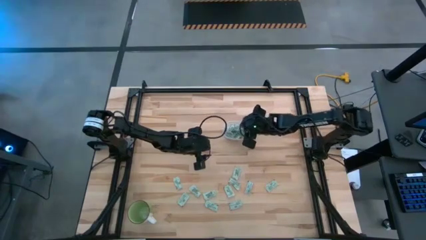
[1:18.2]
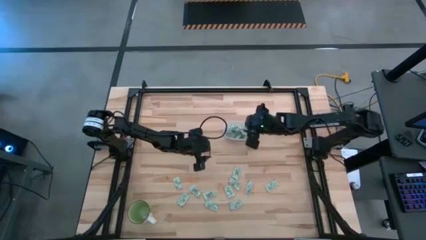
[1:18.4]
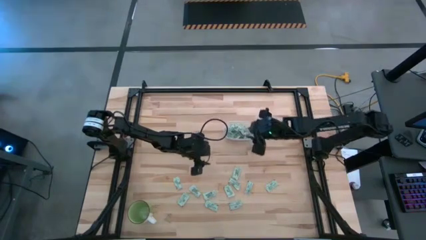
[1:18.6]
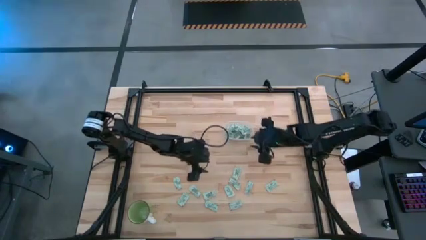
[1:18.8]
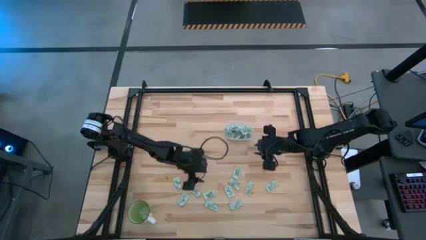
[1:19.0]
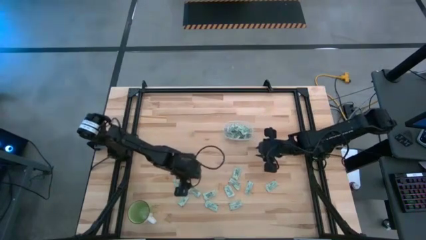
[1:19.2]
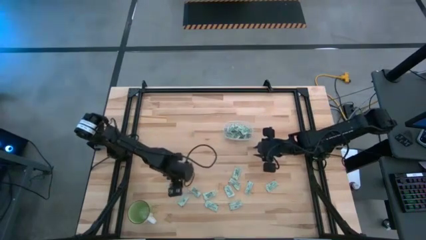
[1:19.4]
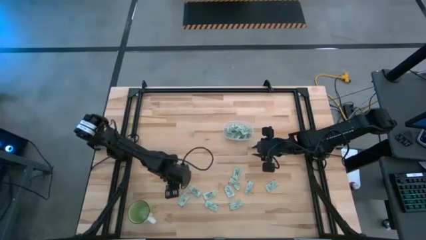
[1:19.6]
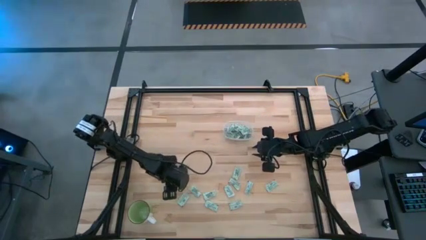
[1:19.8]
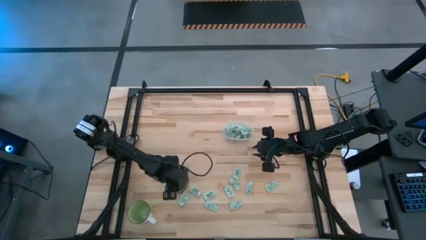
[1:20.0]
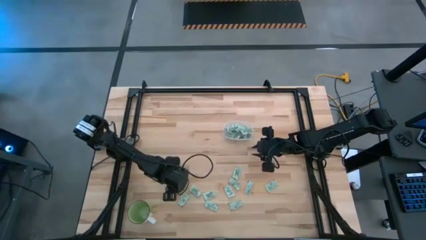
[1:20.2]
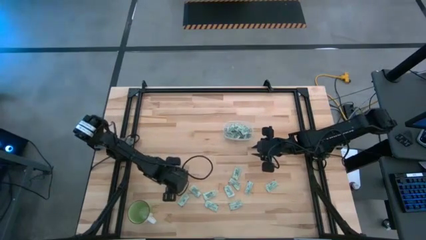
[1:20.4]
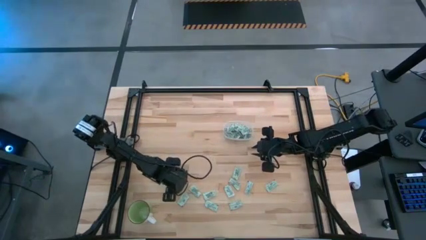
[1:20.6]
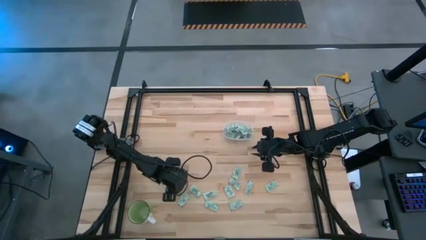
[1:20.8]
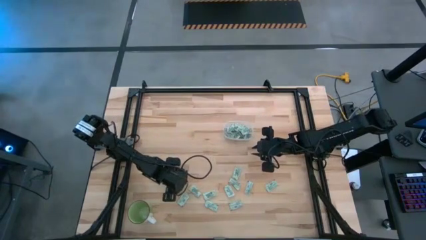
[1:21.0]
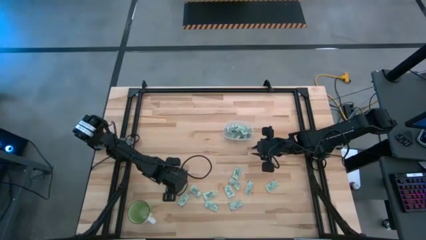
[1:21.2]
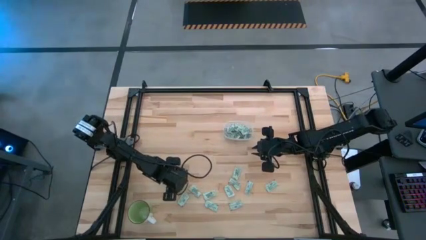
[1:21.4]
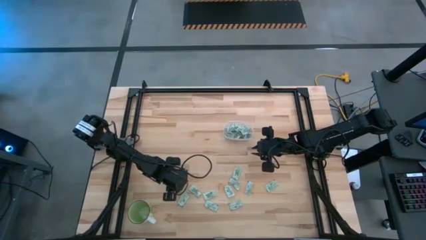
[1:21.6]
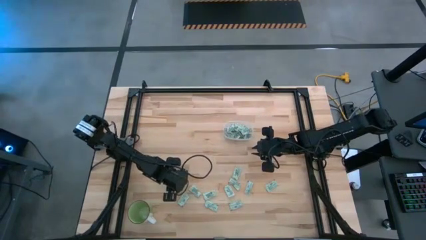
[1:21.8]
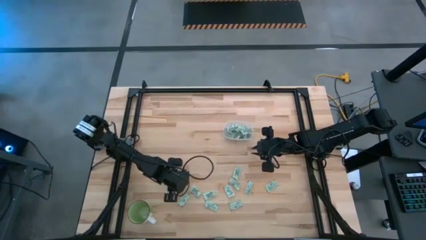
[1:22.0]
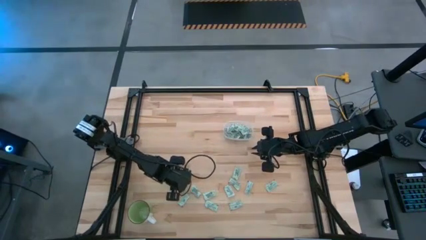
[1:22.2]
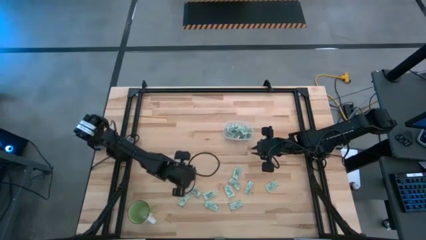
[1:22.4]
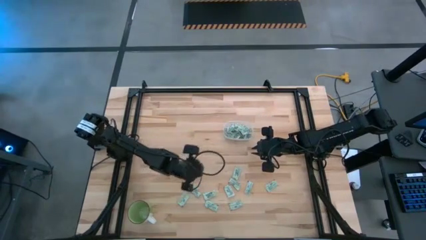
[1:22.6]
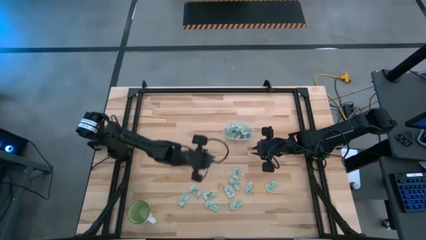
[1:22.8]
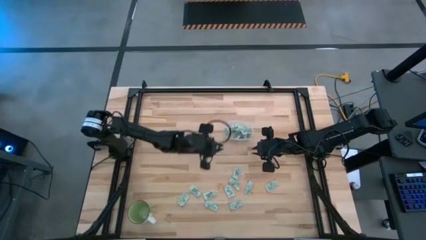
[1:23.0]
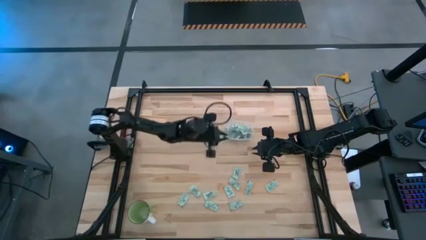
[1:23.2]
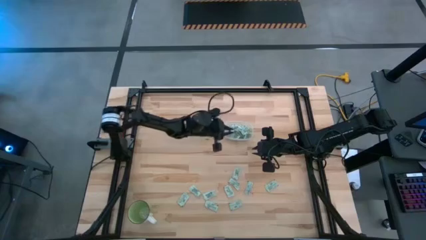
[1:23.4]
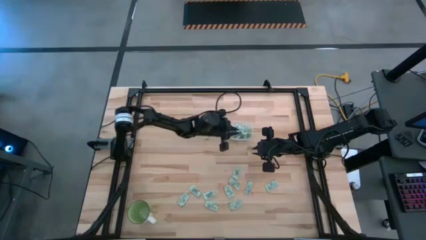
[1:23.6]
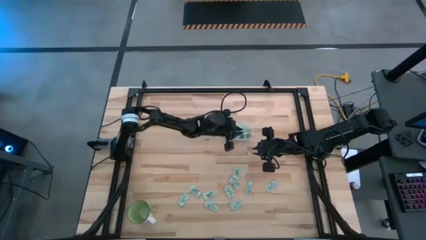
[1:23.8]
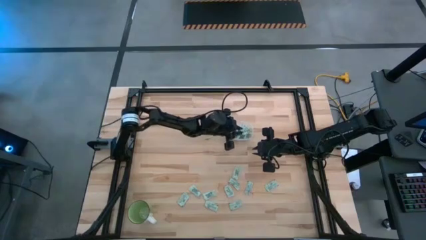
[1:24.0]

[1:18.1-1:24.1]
Task: Pick and place Stevia / Truvia into bins
Put the stevia packet into the transparent bin

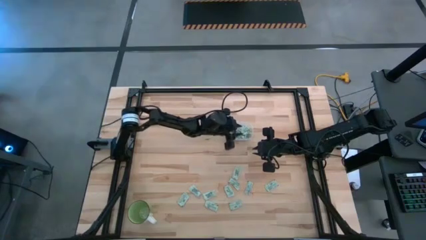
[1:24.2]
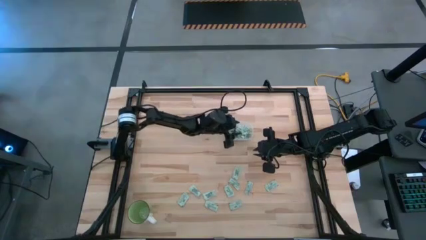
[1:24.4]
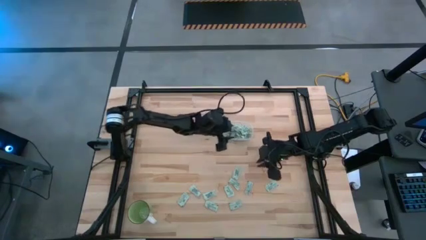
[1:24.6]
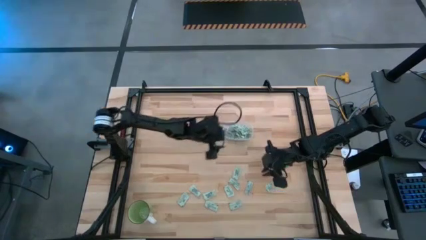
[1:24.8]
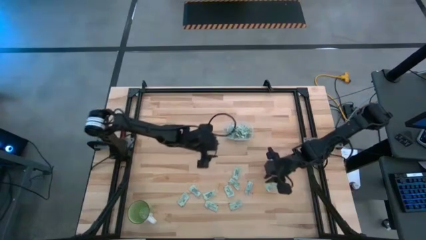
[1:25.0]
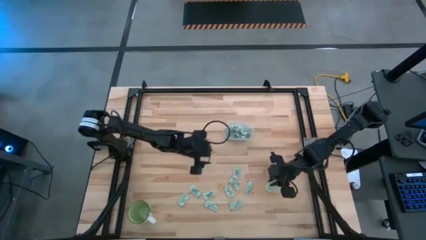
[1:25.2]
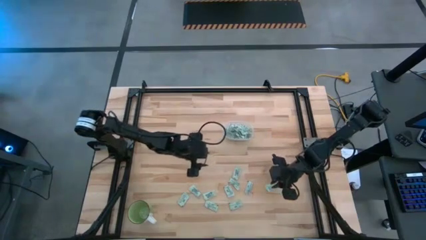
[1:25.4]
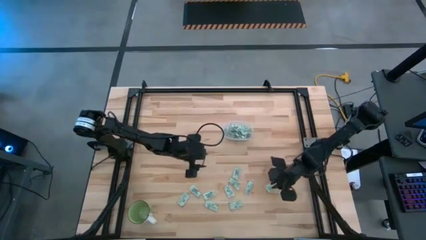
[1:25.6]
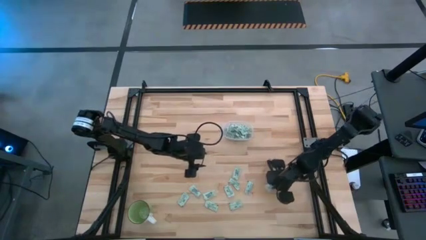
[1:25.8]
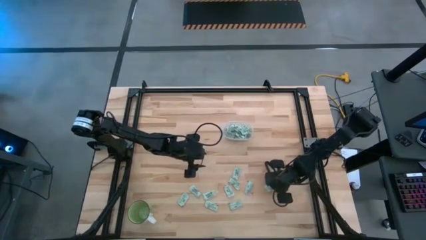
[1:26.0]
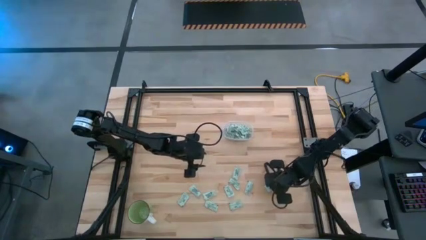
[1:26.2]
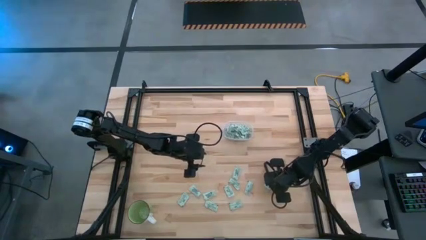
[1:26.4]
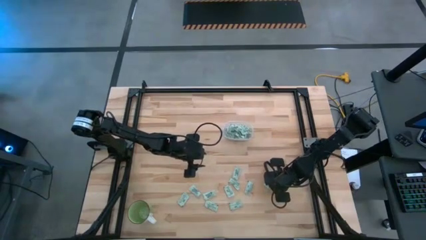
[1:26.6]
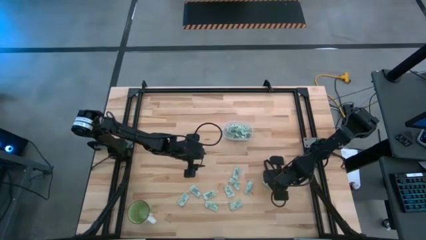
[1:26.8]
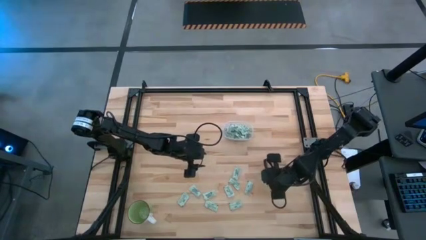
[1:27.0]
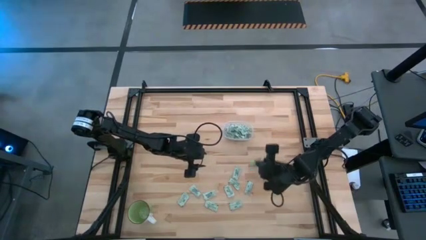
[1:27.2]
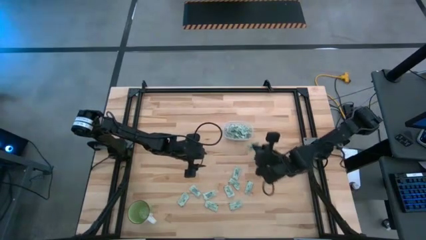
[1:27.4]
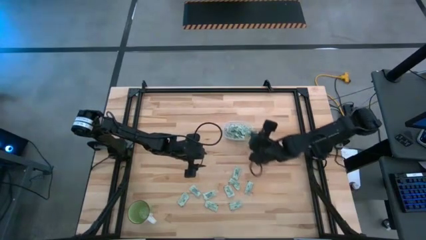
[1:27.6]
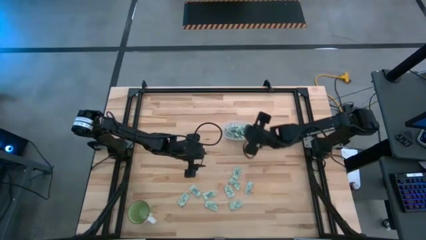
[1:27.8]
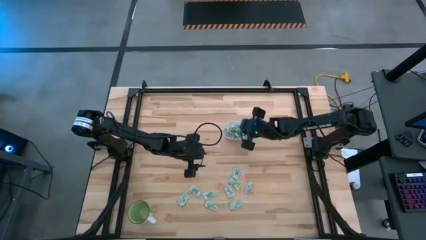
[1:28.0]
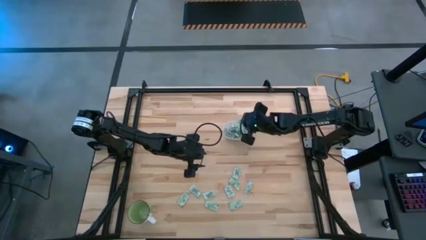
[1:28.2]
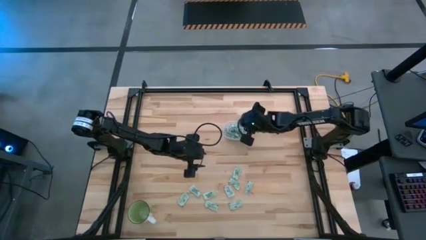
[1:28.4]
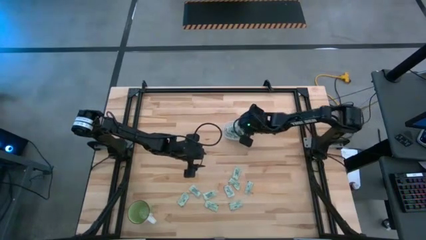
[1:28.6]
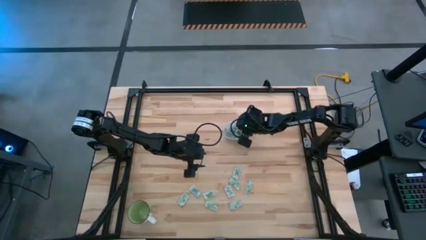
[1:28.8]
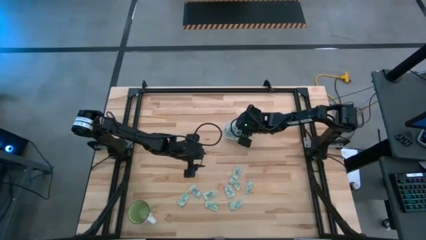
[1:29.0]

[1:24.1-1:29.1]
Put the stevia packet into the transparent bin

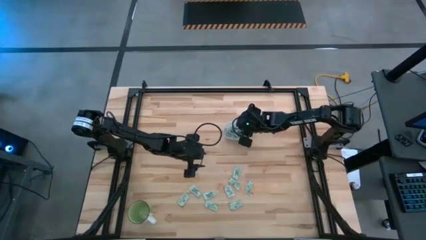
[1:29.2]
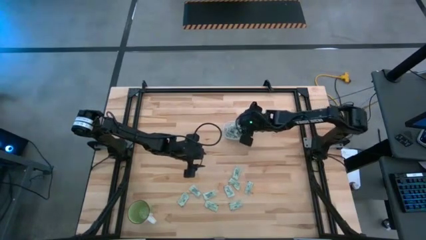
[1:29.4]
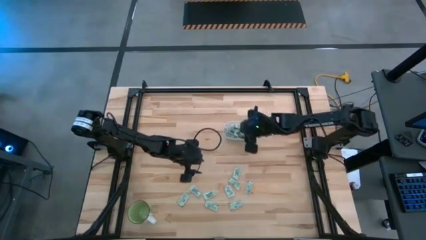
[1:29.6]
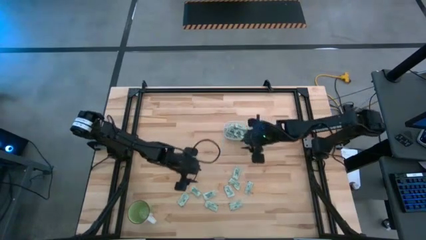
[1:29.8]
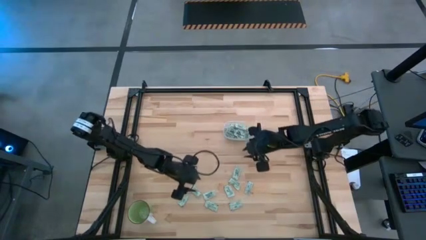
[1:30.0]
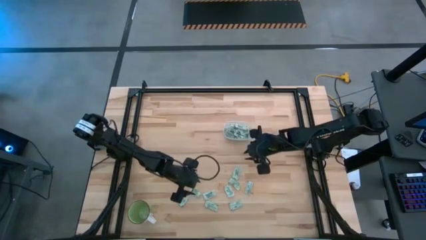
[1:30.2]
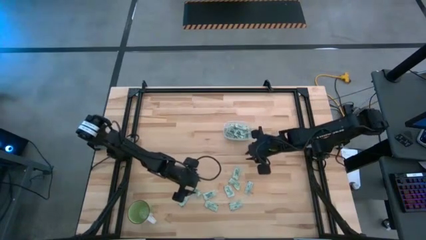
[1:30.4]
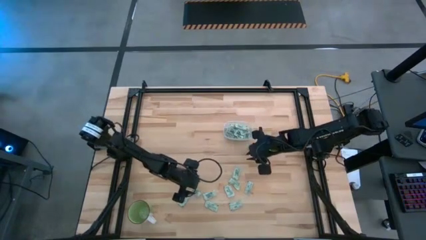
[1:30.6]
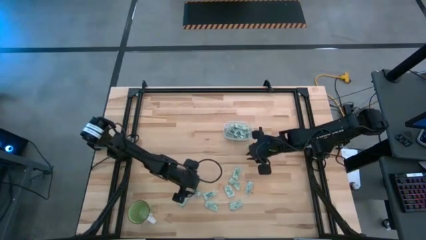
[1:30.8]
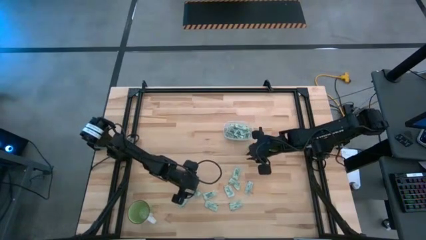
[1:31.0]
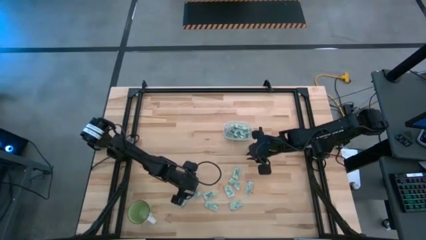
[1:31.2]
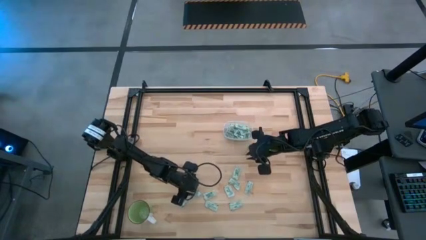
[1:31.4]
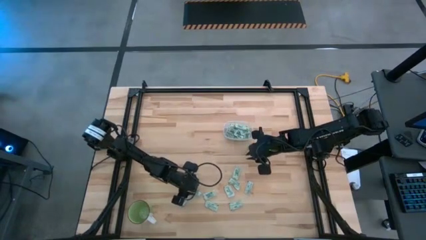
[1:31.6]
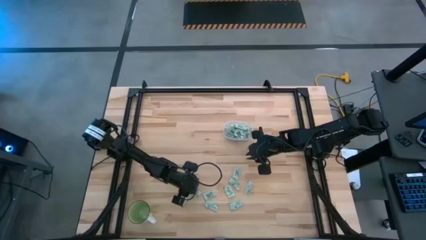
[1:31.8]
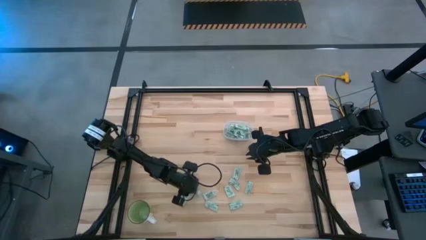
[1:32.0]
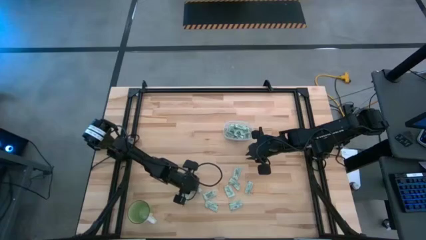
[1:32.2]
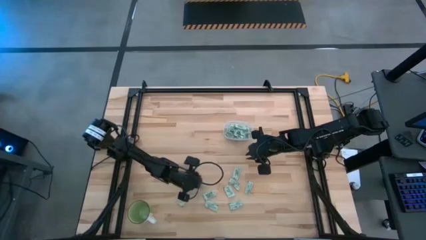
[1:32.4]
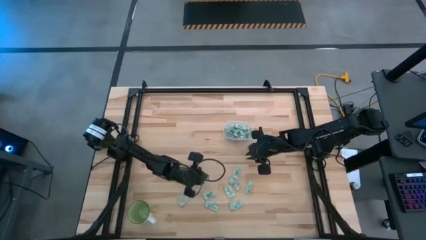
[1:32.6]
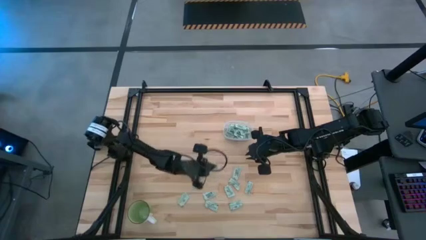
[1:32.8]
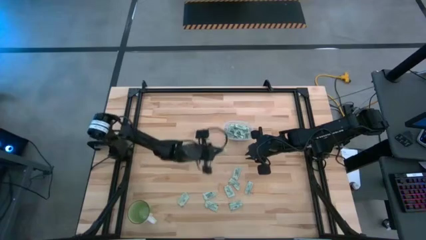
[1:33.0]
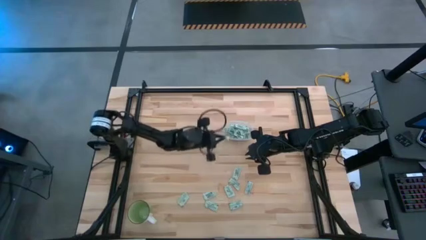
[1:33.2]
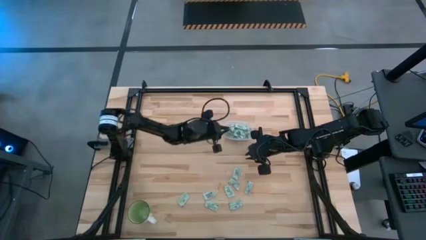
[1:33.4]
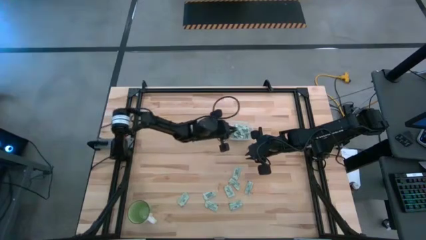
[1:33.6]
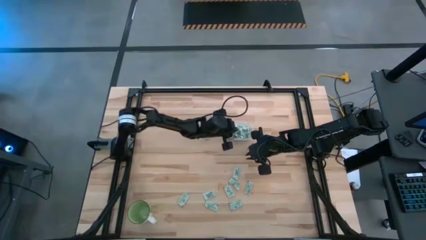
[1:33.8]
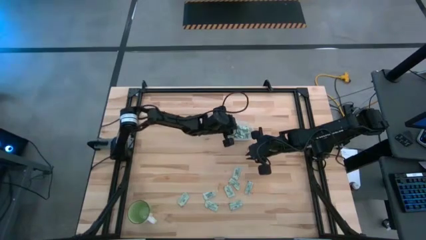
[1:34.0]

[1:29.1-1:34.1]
Put the stevia packet into the transparent bin
